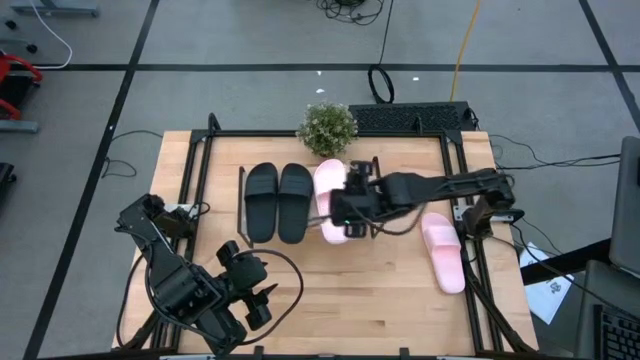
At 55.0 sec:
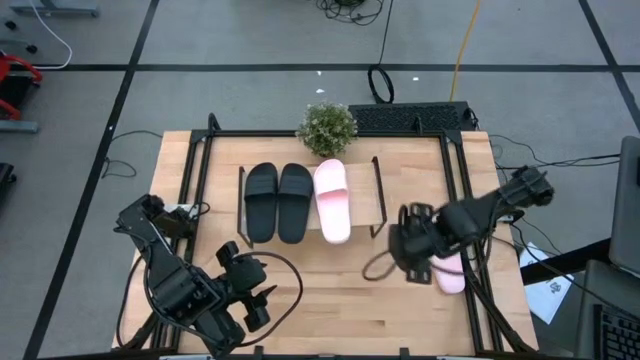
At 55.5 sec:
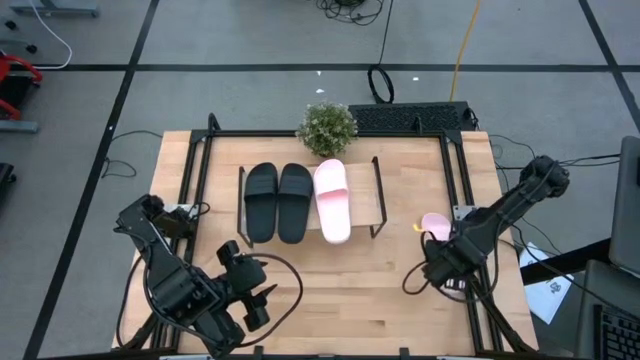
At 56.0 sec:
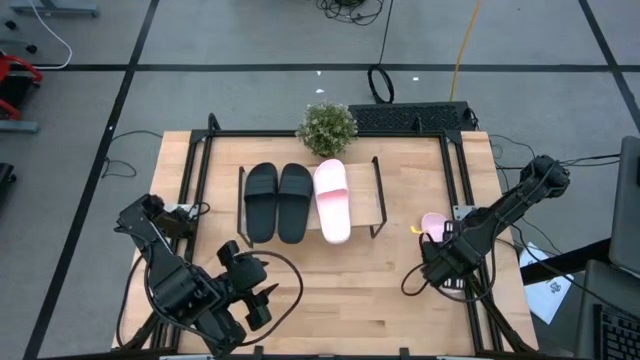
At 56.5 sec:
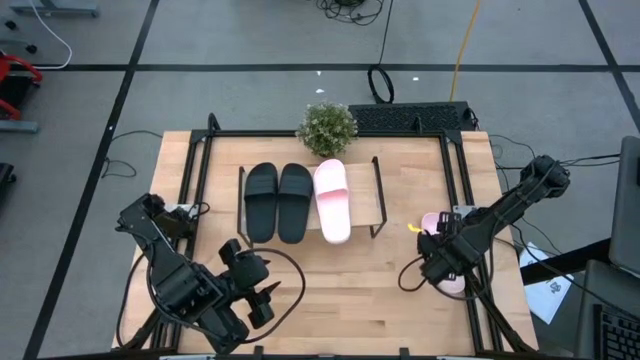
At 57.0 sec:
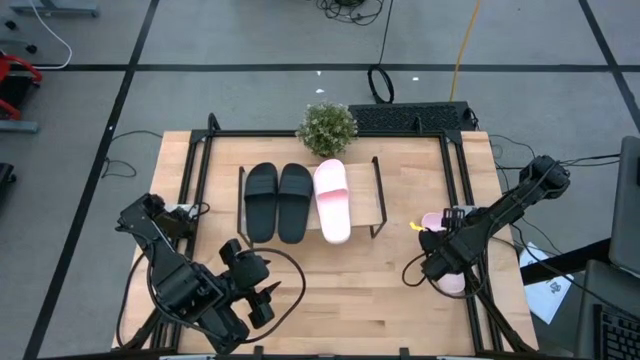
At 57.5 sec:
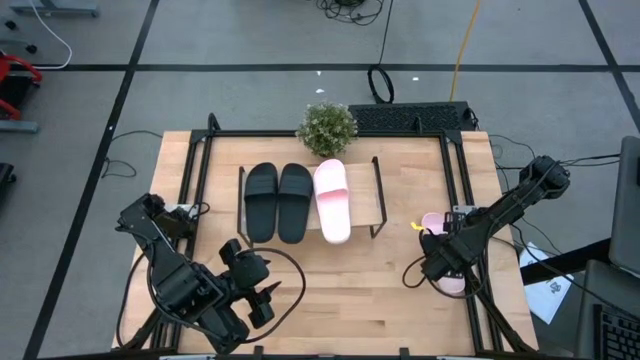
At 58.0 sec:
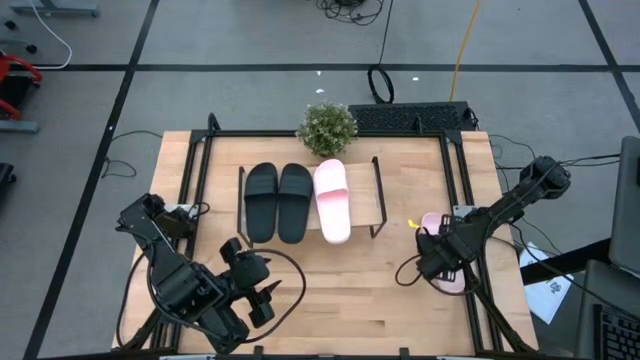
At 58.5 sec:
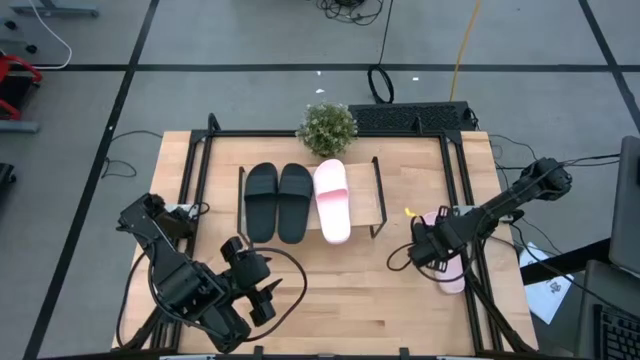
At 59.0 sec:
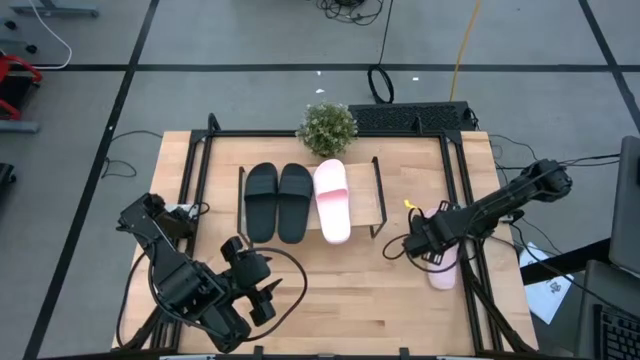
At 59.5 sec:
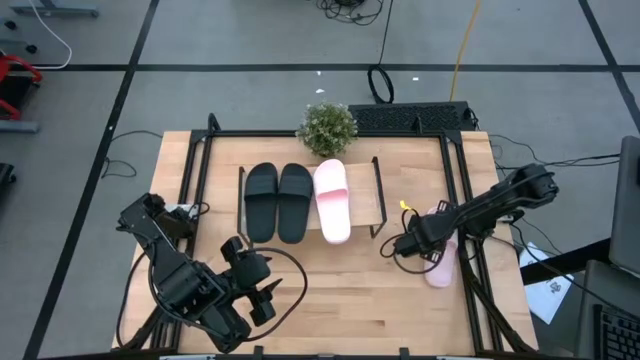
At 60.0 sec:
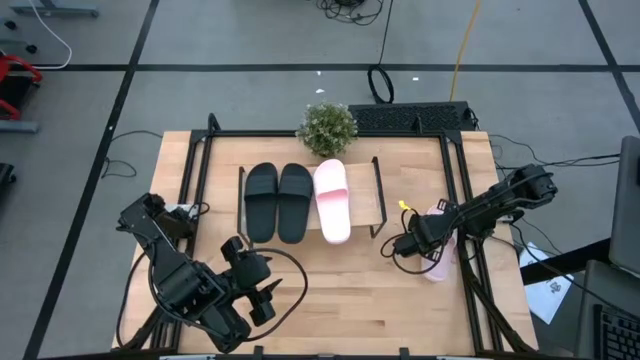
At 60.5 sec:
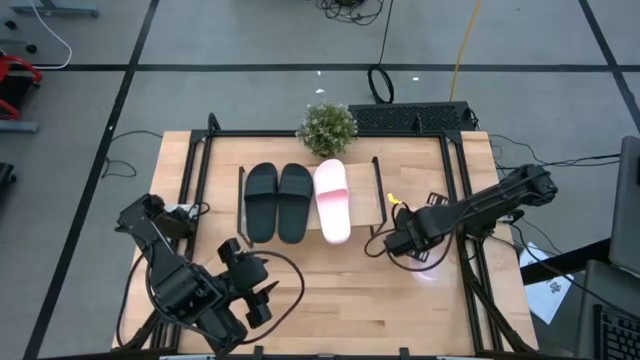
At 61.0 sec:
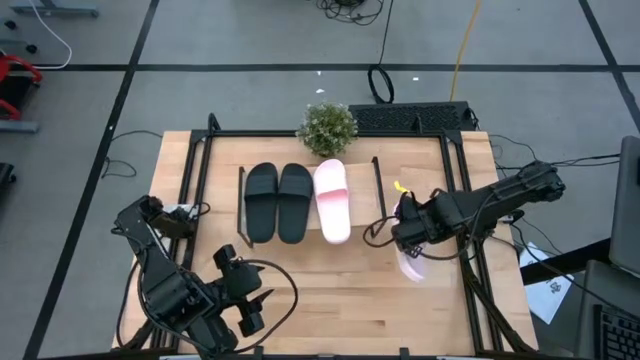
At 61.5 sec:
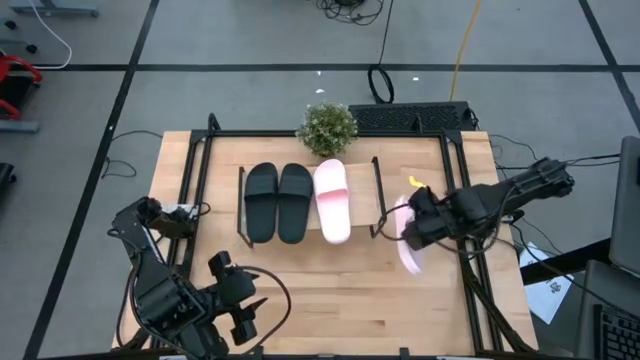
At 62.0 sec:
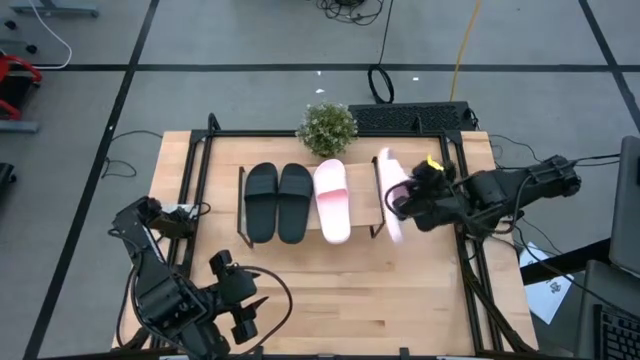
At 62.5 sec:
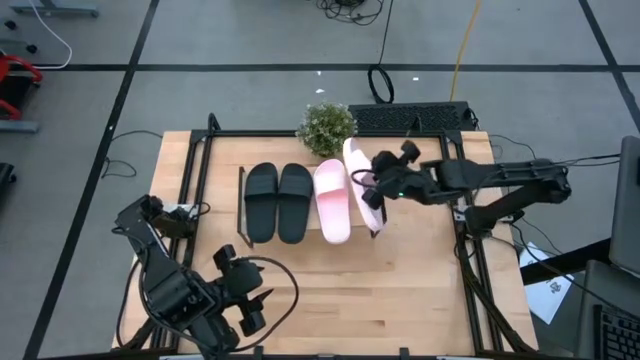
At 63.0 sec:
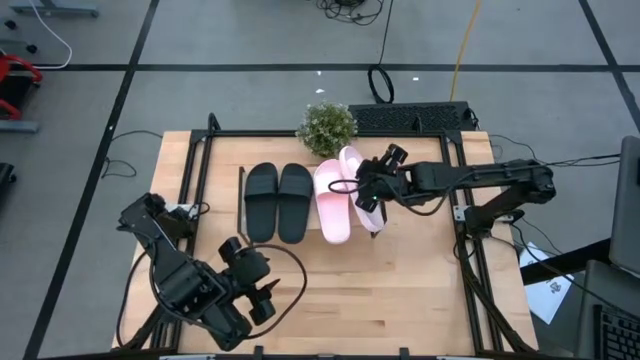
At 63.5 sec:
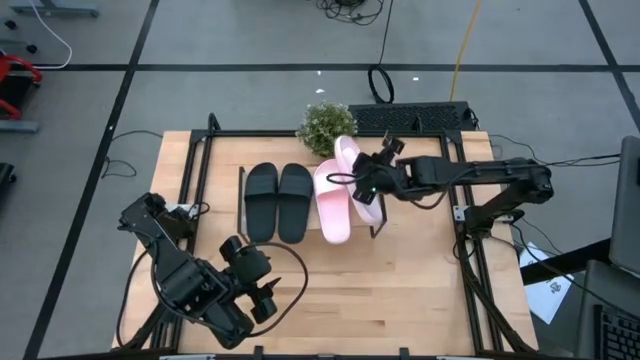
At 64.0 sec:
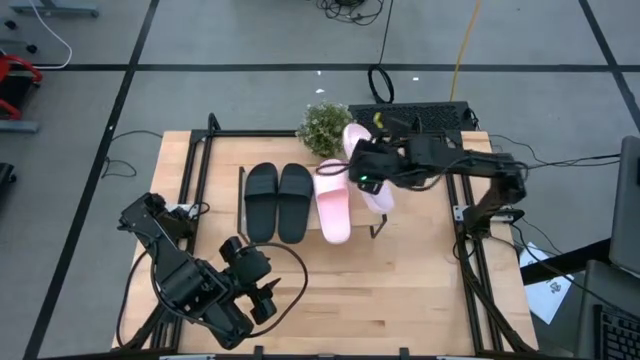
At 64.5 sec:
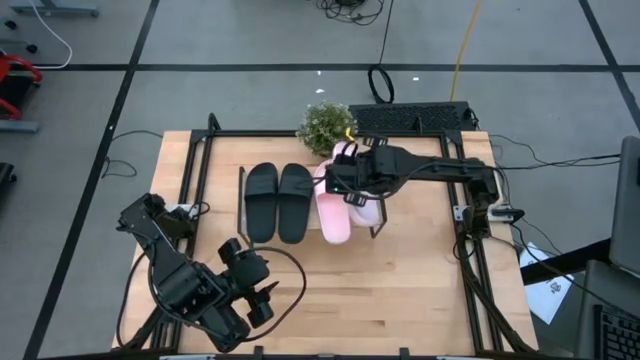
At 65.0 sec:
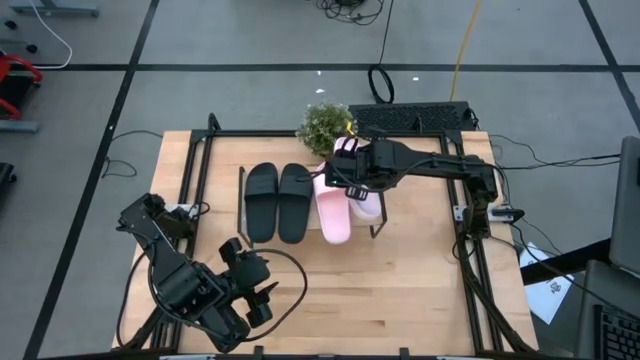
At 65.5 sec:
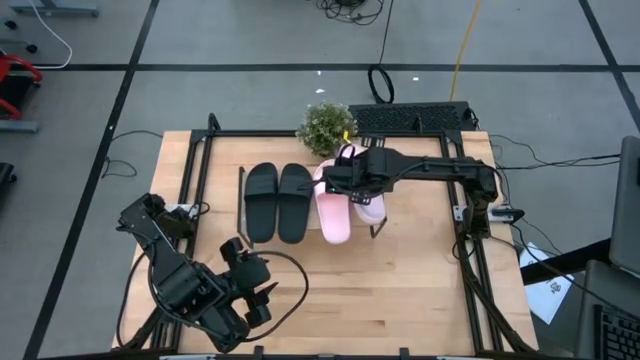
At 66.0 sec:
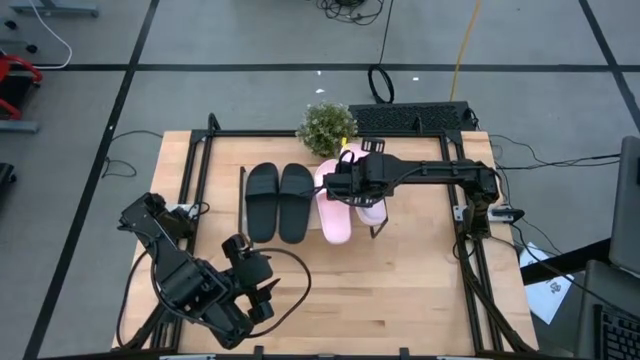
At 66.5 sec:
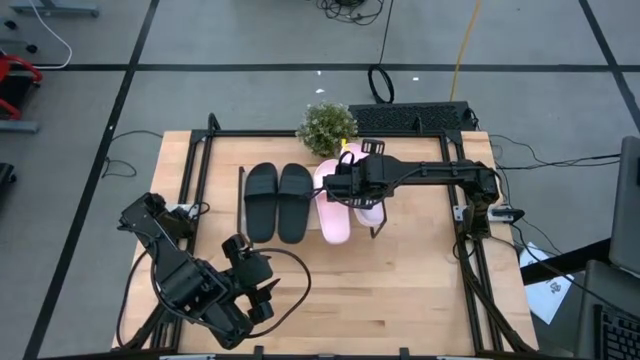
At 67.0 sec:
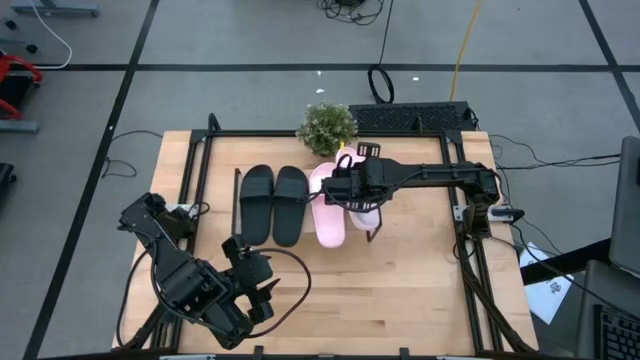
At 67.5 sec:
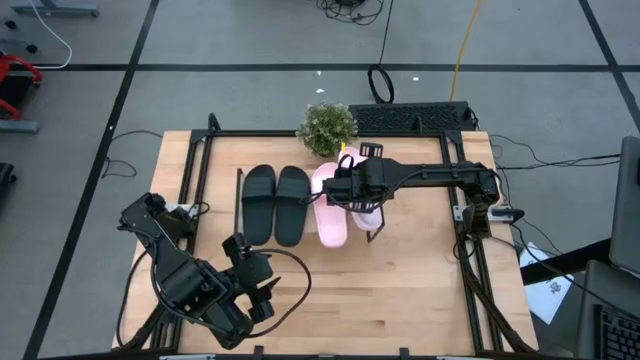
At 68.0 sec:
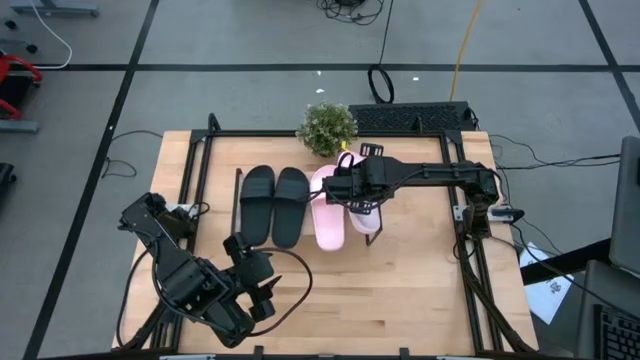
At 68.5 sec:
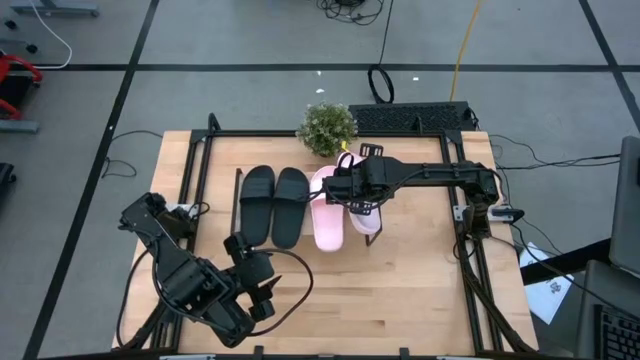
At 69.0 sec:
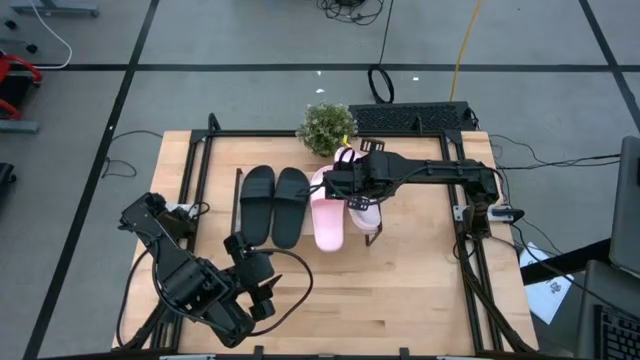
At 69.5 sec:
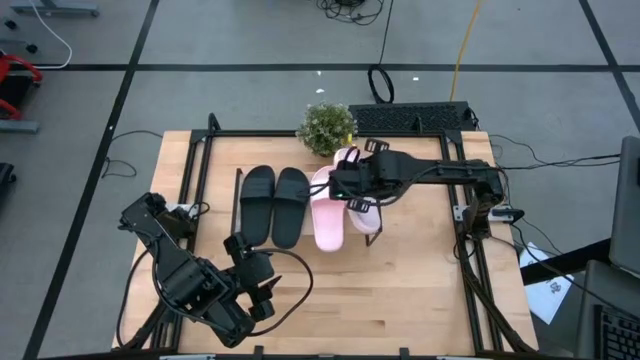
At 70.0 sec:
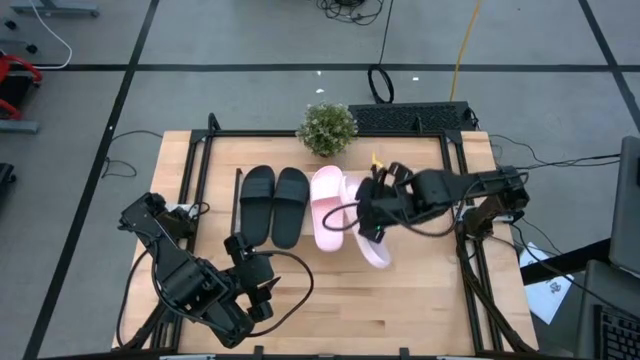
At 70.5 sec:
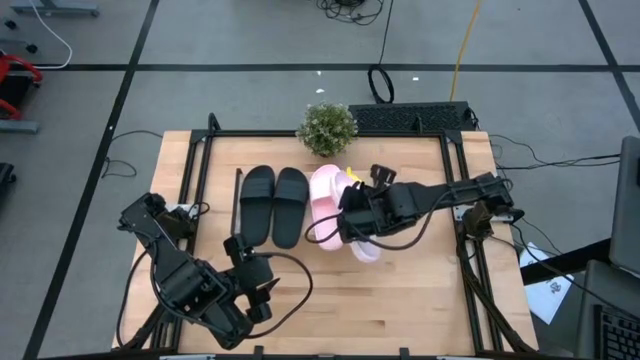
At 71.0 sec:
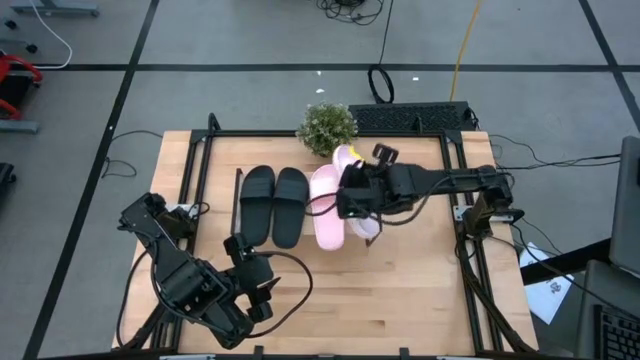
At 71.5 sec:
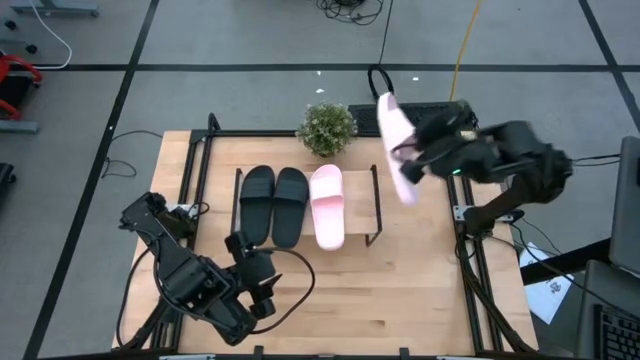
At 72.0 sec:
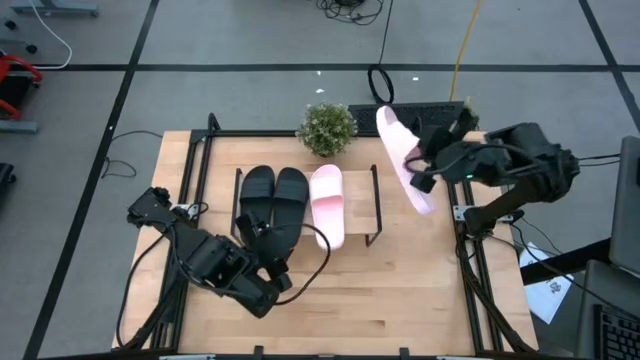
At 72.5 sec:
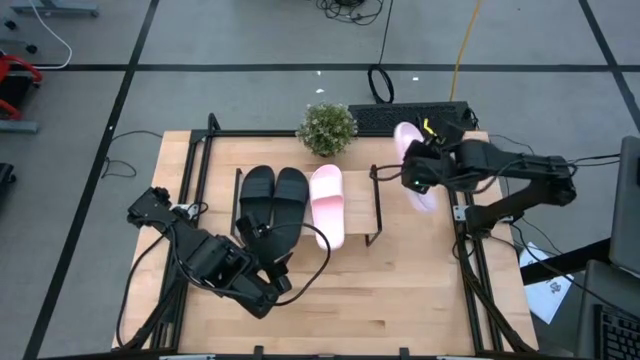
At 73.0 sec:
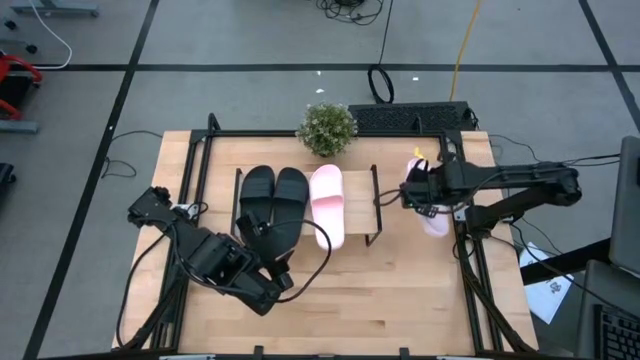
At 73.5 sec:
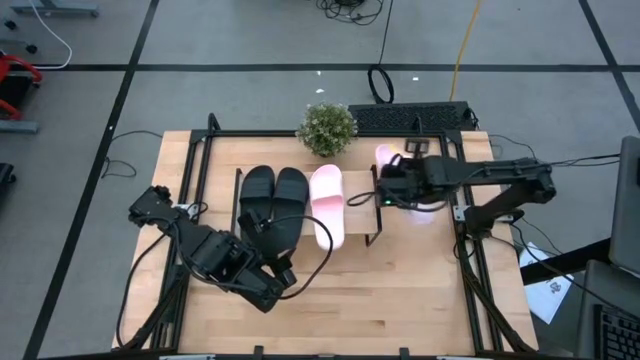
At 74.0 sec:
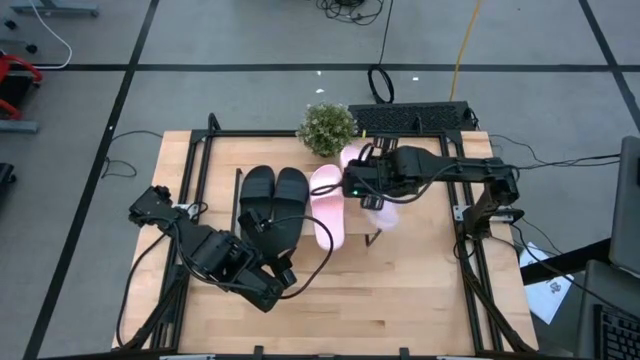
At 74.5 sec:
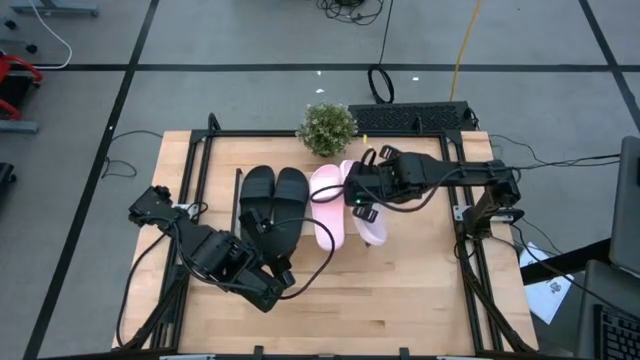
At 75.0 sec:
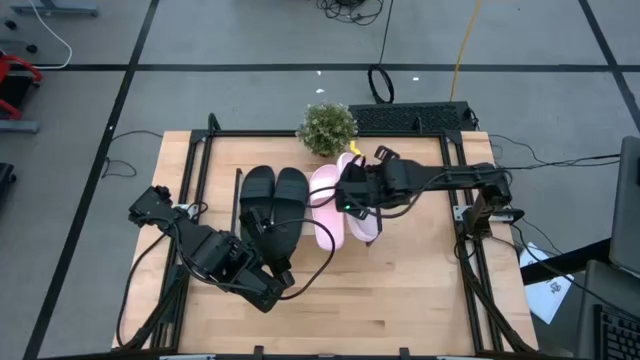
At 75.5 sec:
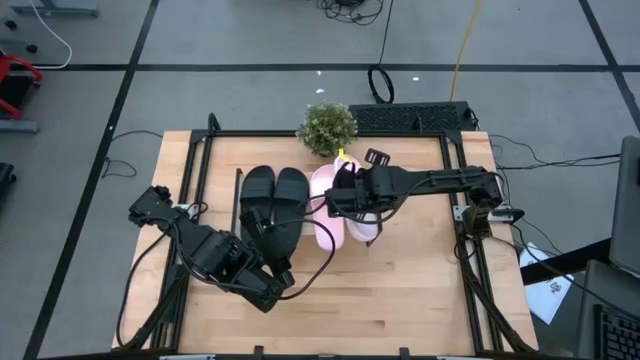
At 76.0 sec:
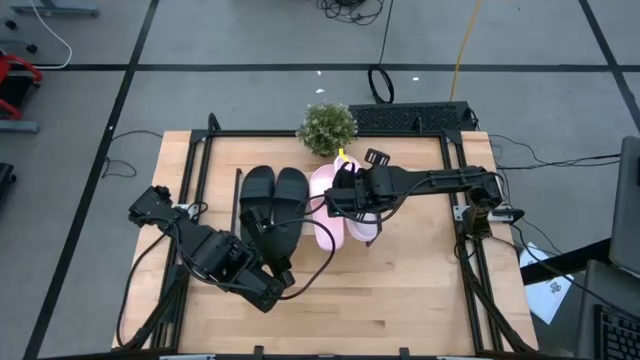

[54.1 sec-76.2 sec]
Task: Pick and place slides into the shelf
Put the pink slide on the shelf
